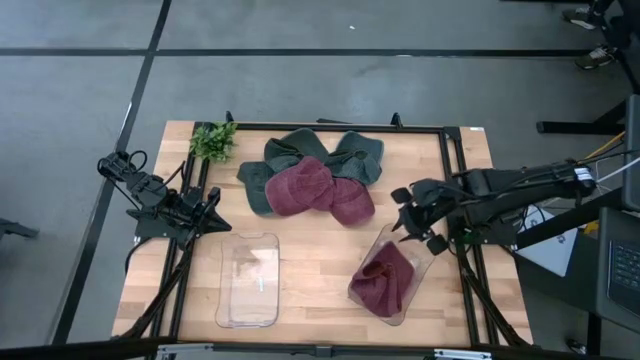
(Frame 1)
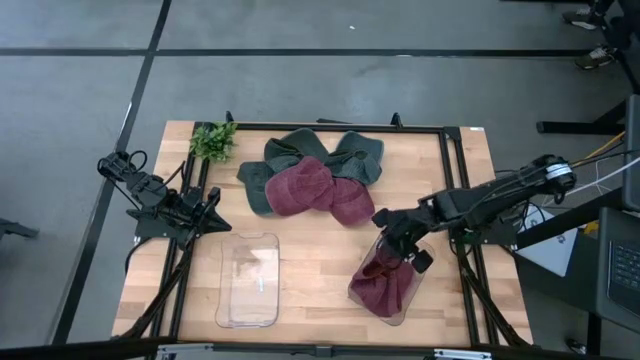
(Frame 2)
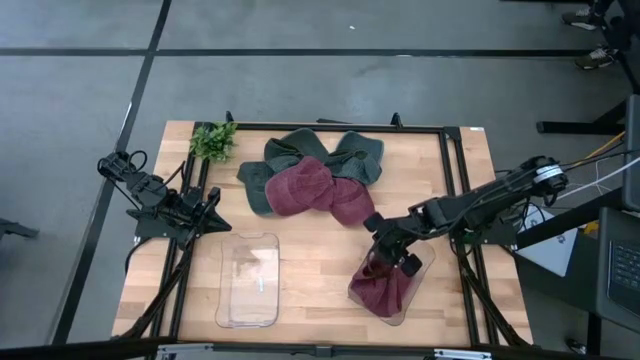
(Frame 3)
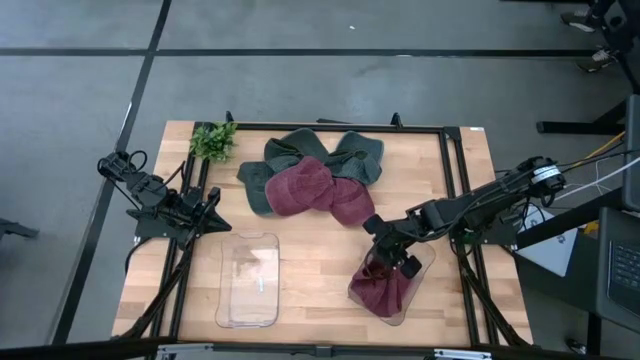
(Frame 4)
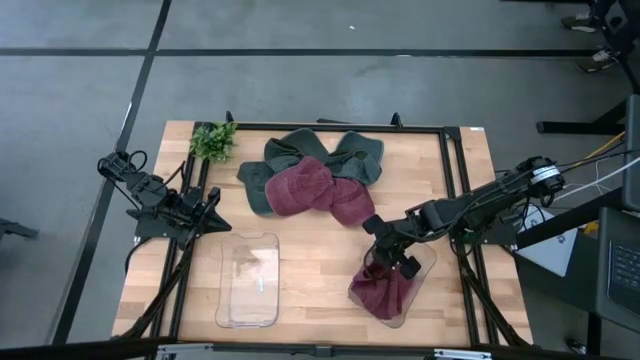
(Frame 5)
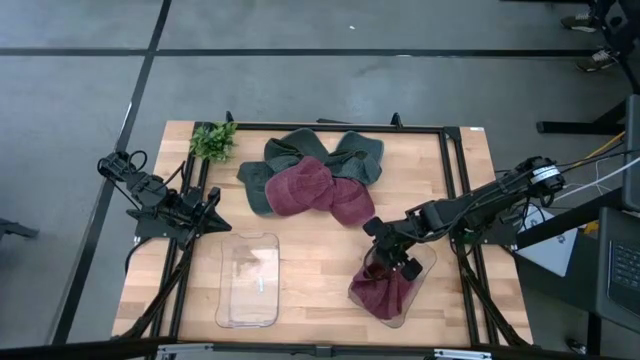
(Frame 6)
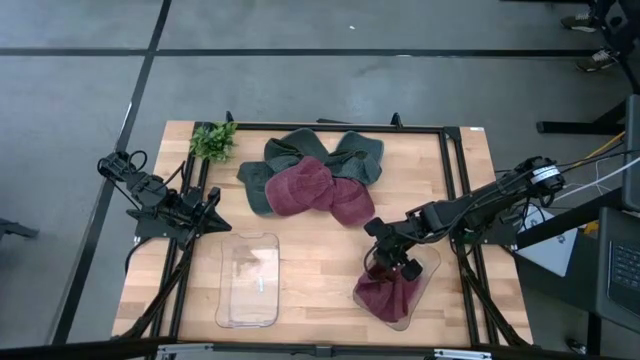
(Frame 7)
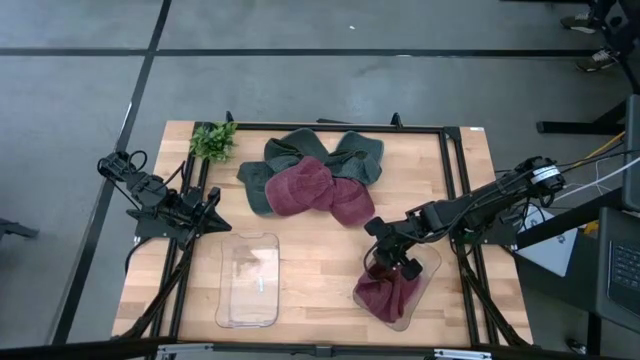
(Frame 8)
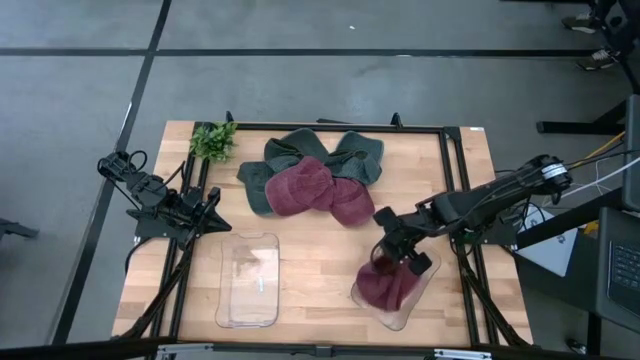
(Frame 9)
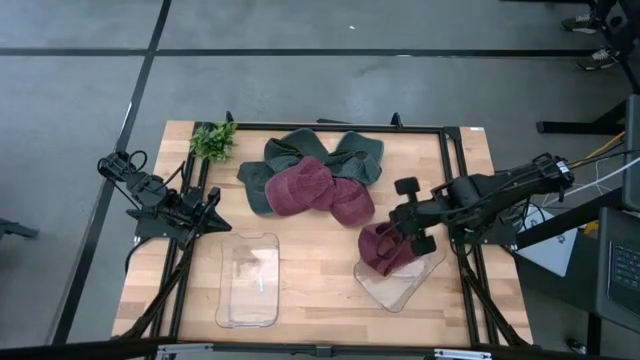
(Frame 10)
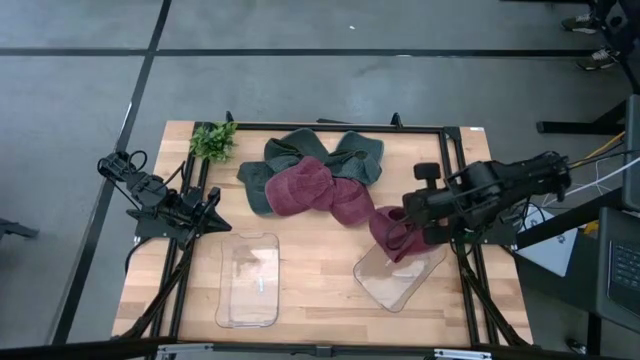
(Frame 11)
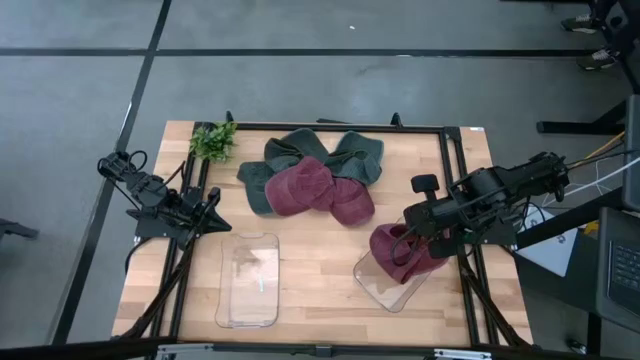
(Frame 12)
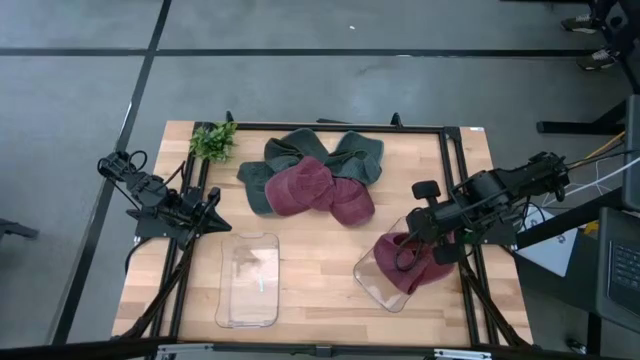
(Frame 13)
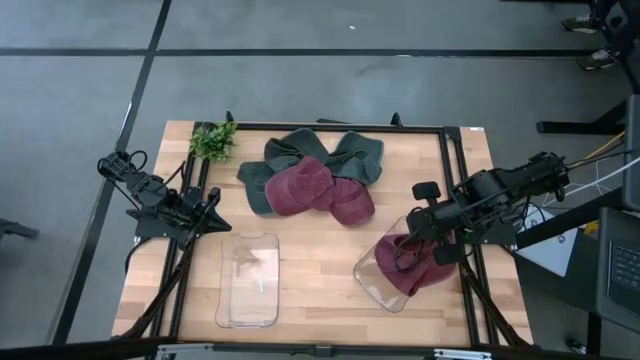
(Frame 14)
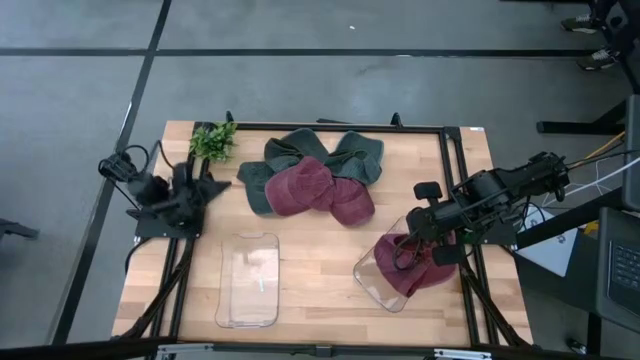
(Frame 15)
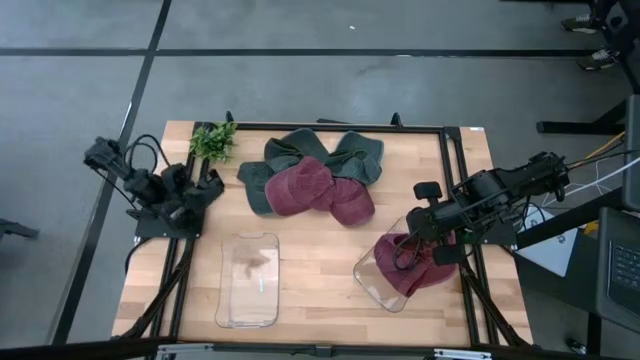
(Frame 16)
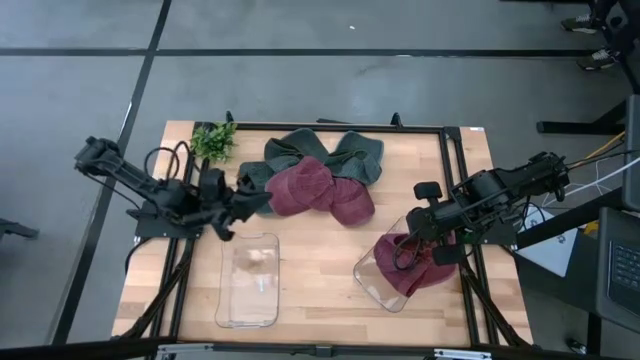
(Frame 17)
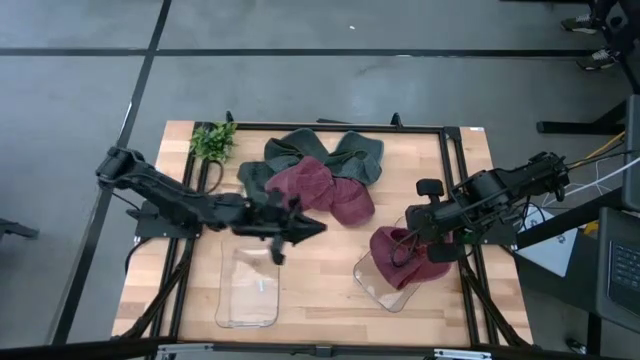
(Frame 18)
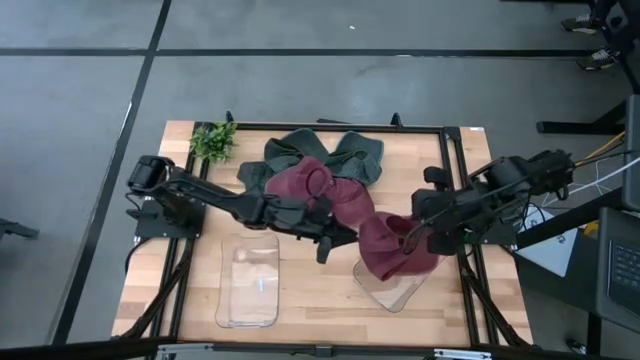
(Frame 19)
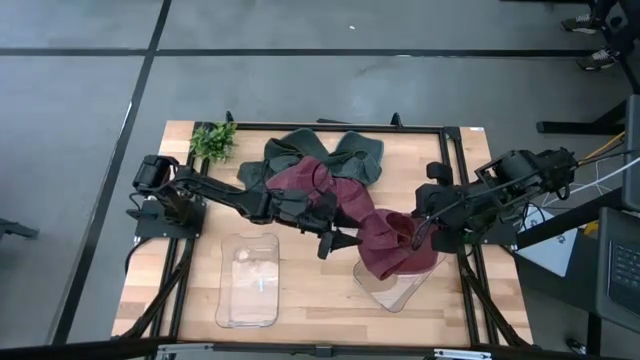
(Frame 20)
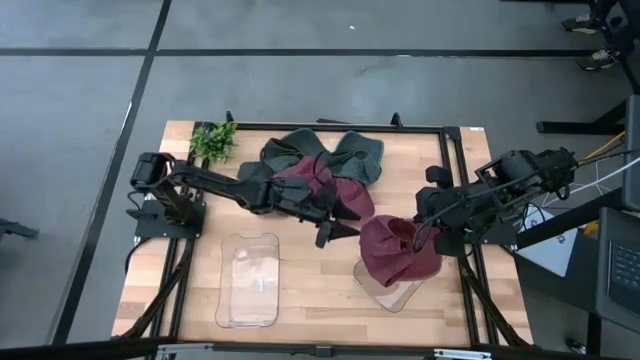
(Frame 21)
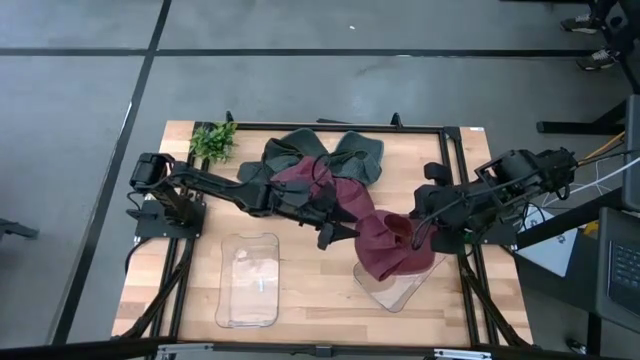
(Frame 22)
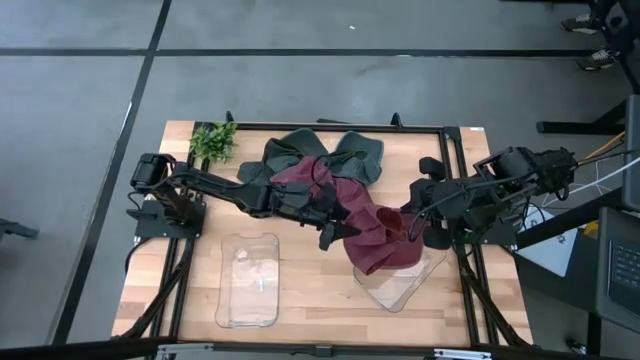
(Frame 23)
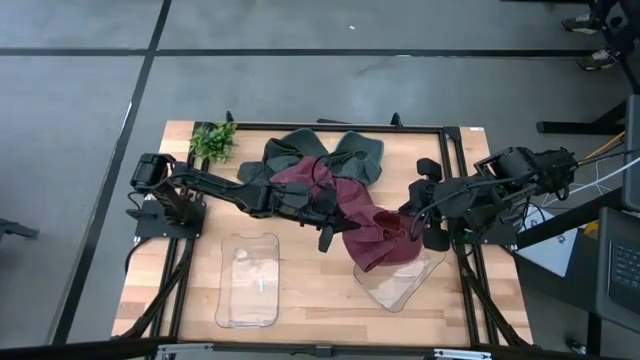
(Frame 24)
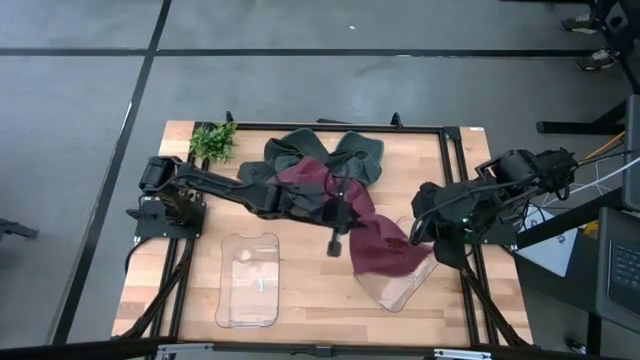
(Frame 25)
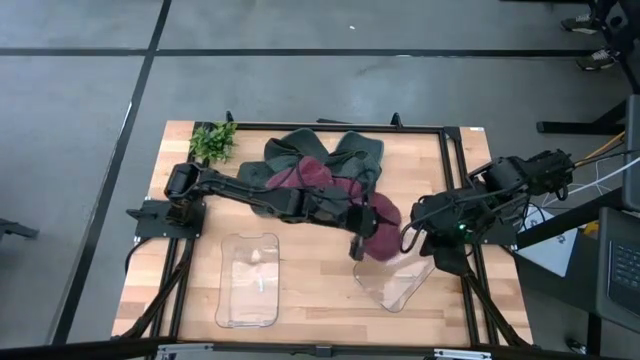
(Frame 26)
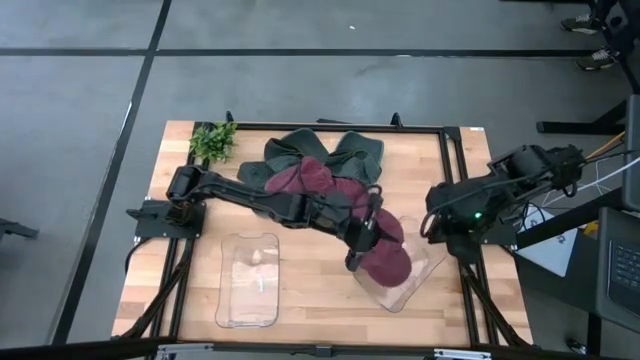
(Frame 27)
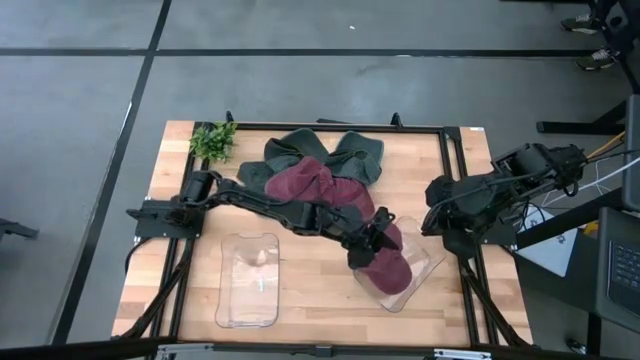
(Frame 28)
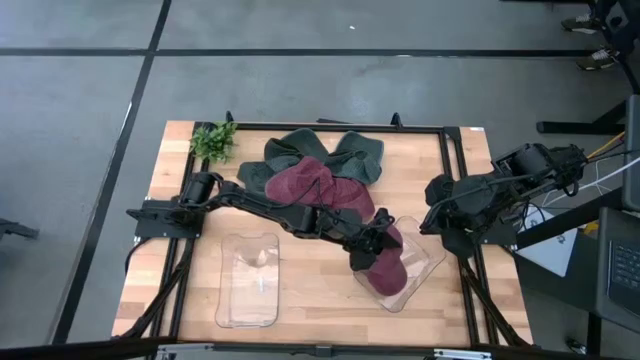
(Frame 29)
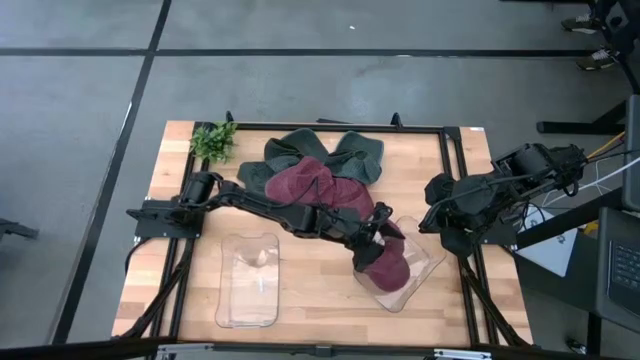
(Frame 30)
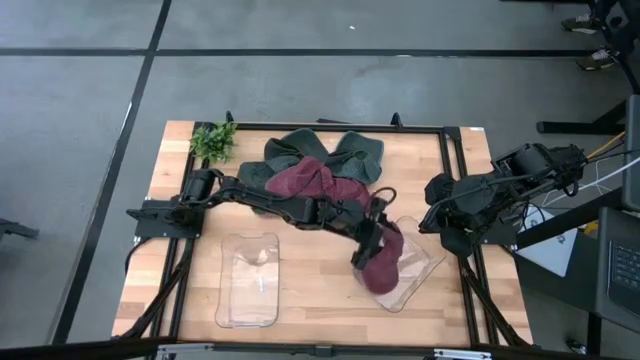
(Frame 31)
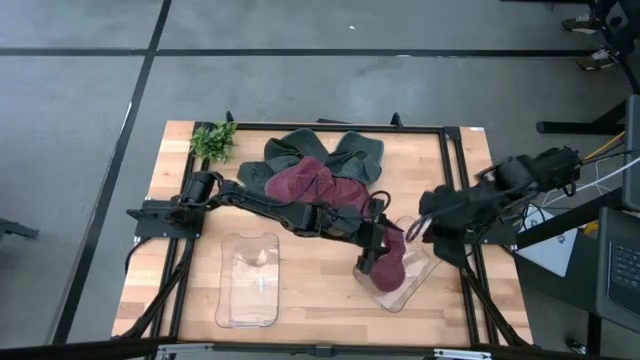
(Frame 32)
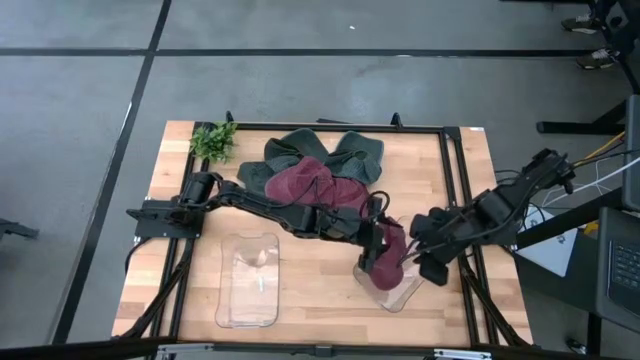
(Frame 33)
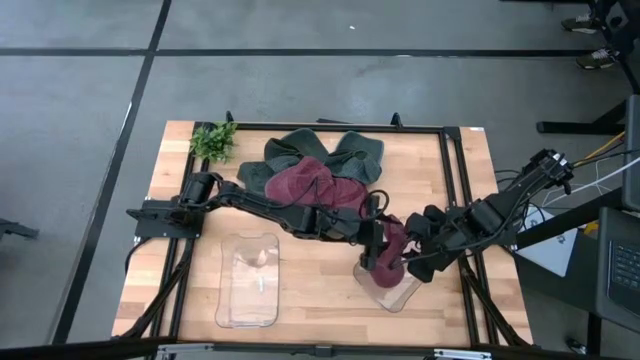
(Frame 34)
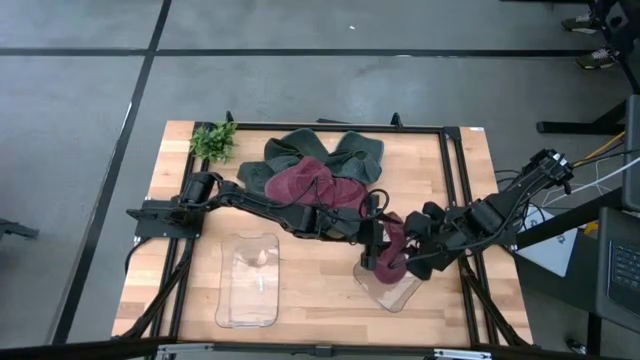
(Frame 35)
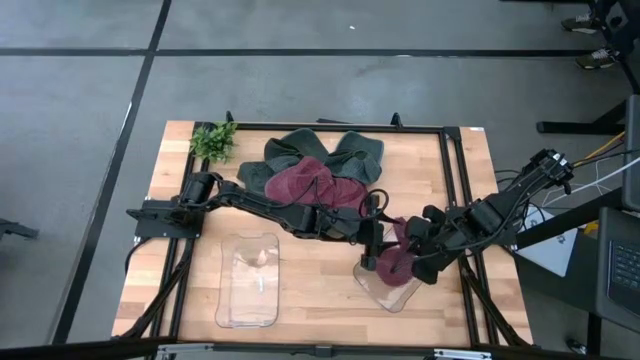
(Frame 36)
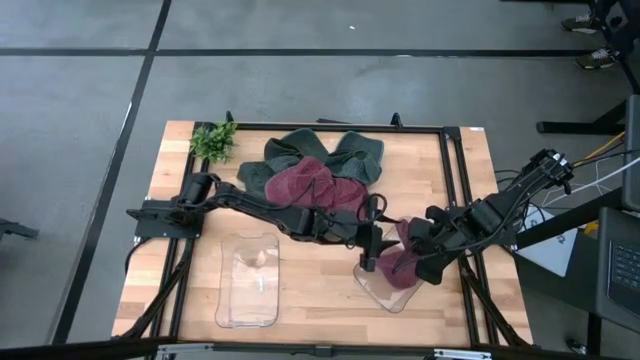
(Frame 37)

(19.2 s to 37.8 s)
Task: Pick & Place hat
Put the right red cap into the right transparent bin

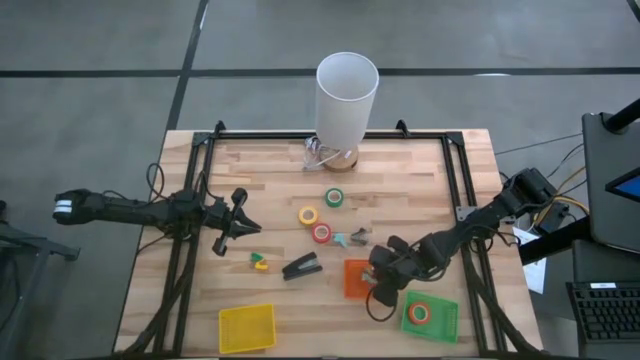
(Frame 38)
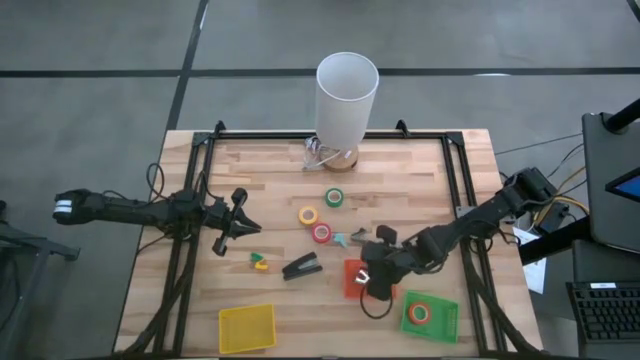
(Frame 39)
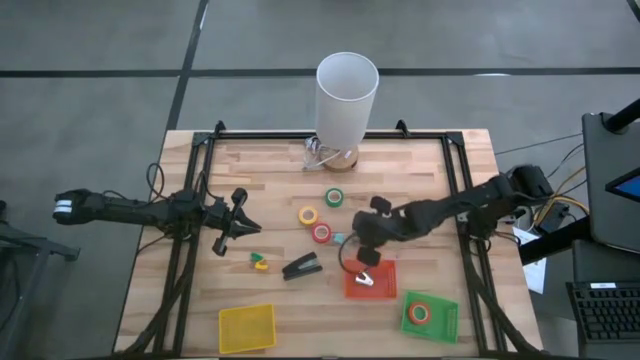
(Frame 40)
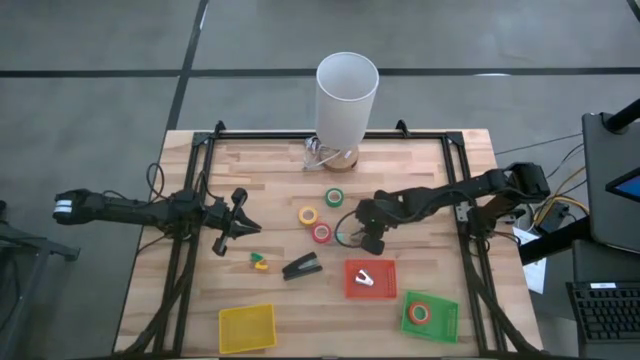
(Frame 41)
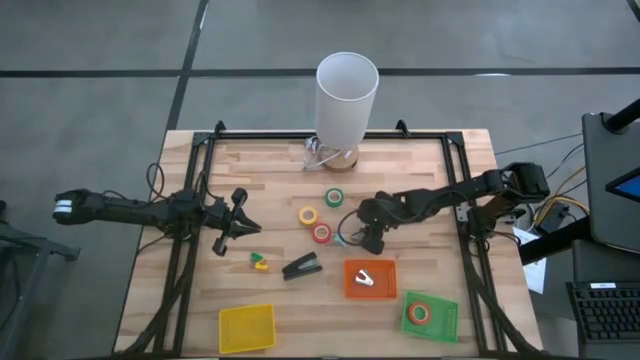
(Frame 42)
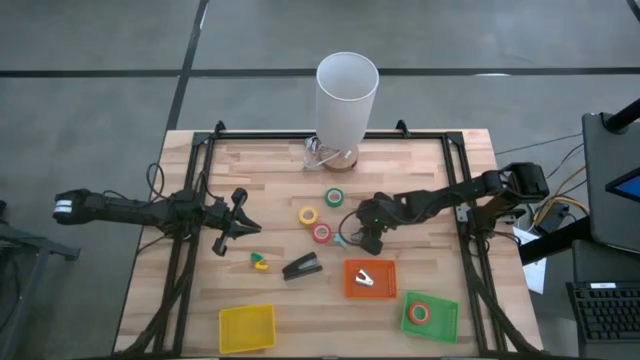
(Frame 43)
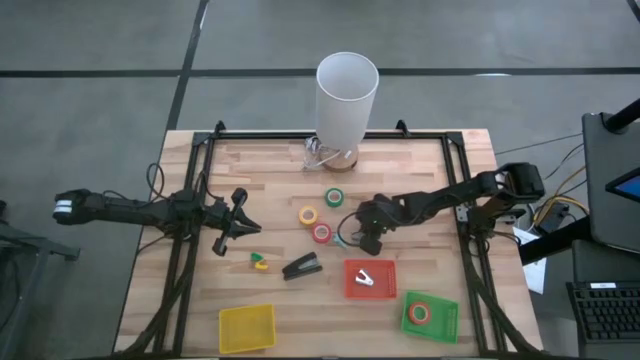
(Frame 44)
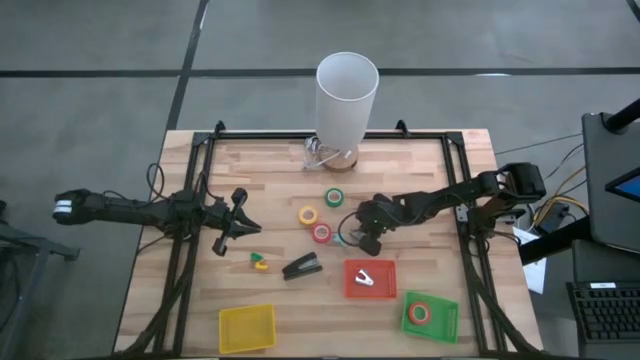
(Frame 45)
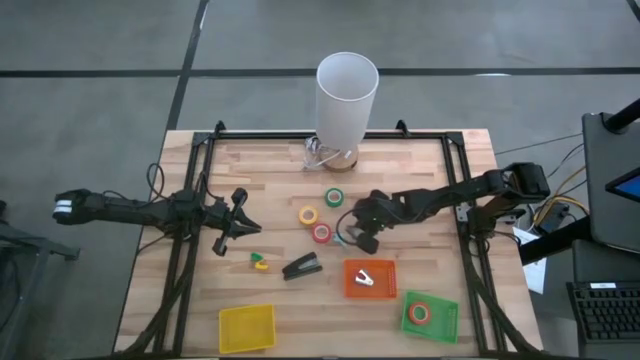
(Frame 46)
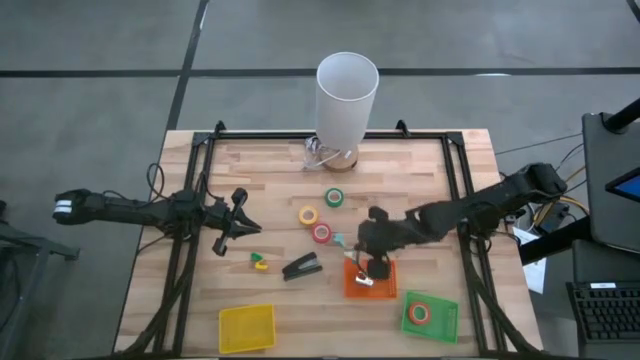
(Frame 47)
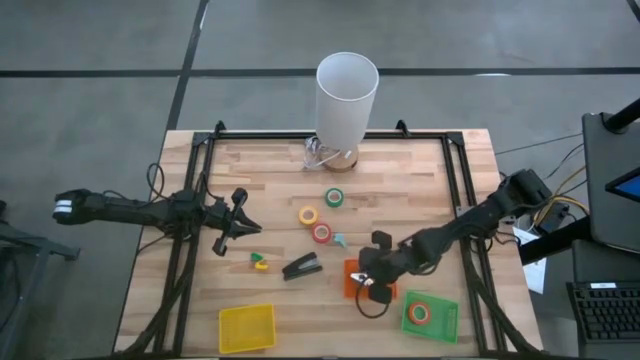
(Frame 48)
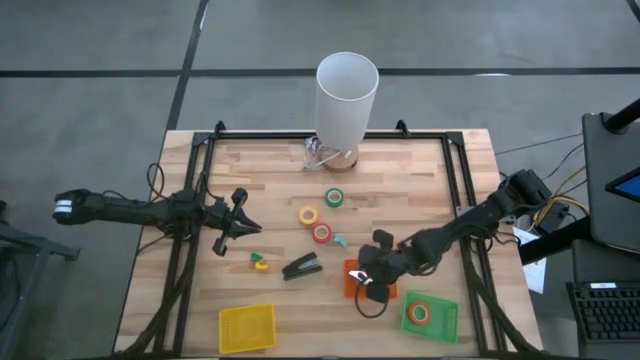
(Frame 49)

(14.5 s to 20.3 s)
Task: Pick and place Stapler, Stapler remover, tape
Put the black stapler remover into the orange basket
